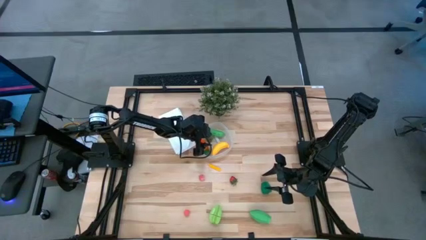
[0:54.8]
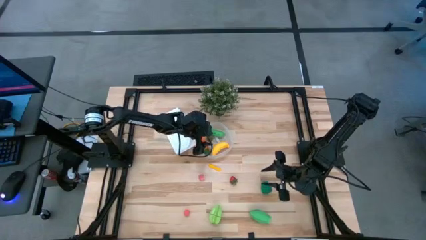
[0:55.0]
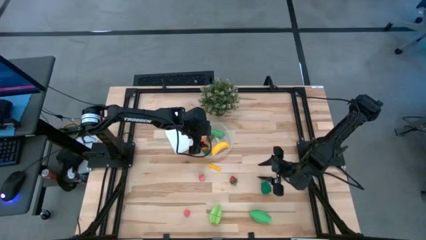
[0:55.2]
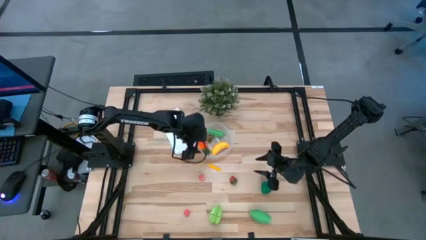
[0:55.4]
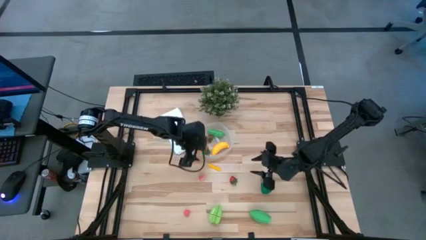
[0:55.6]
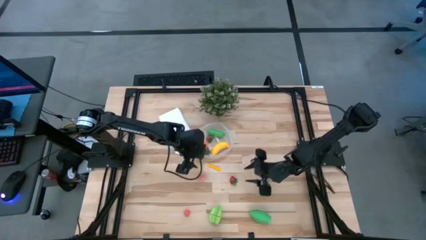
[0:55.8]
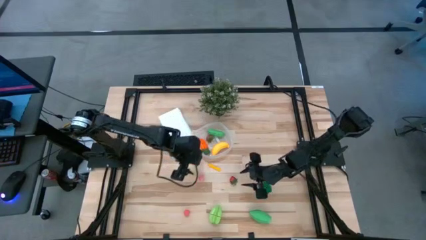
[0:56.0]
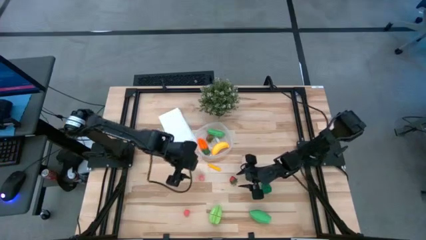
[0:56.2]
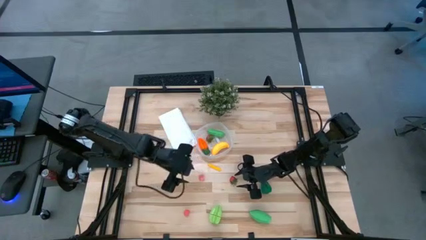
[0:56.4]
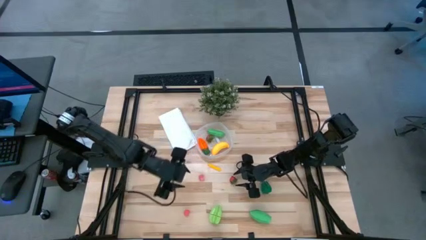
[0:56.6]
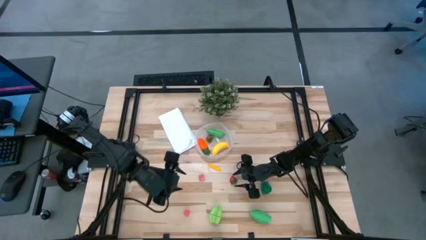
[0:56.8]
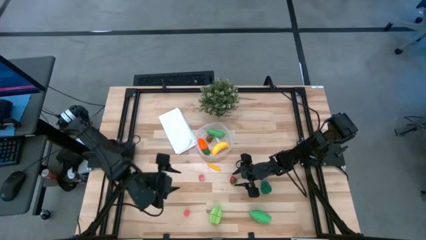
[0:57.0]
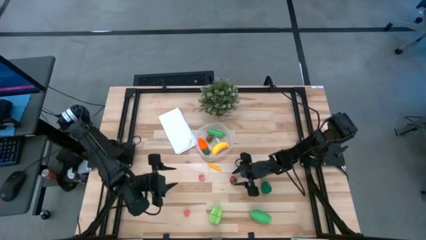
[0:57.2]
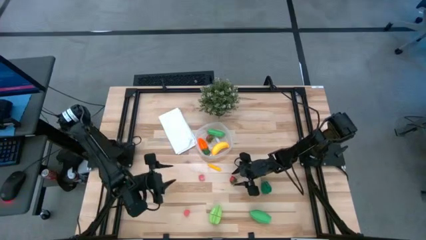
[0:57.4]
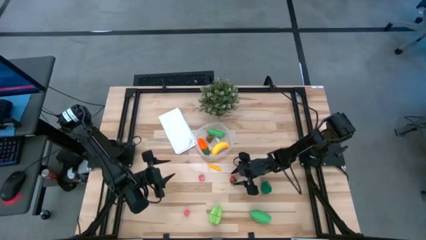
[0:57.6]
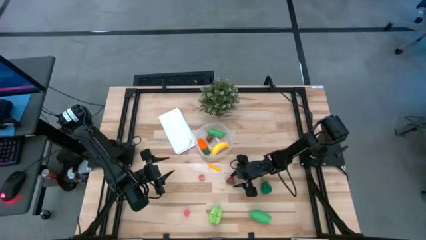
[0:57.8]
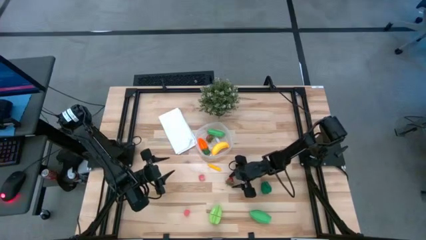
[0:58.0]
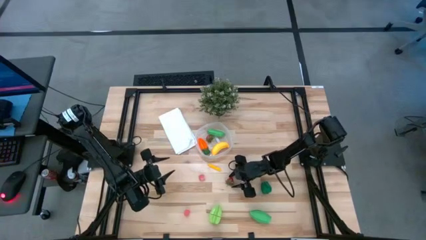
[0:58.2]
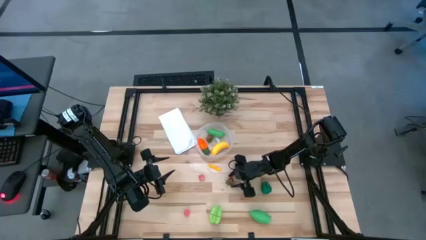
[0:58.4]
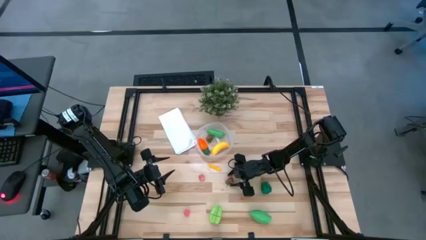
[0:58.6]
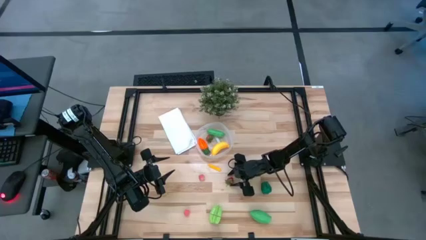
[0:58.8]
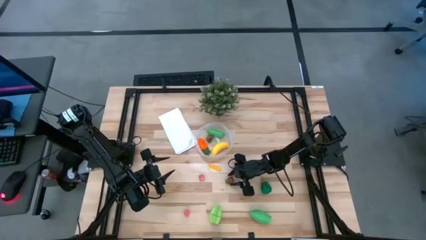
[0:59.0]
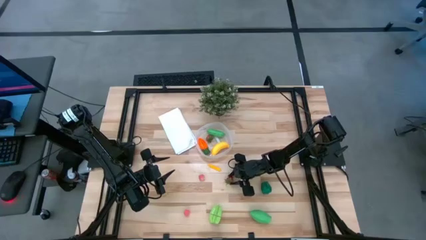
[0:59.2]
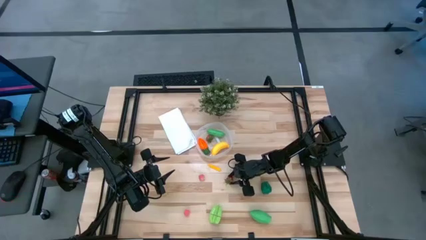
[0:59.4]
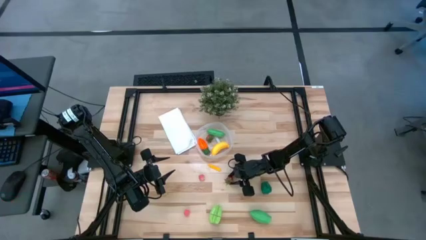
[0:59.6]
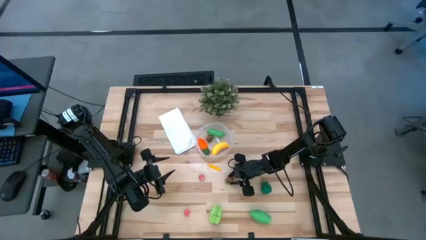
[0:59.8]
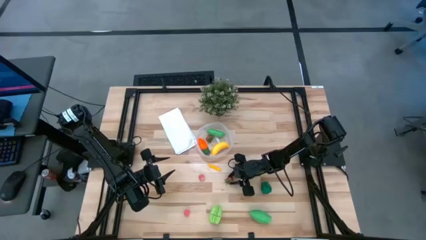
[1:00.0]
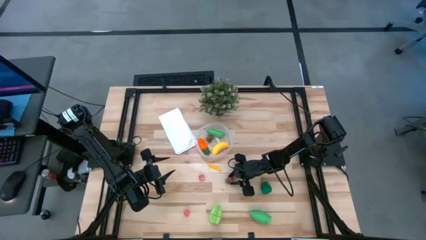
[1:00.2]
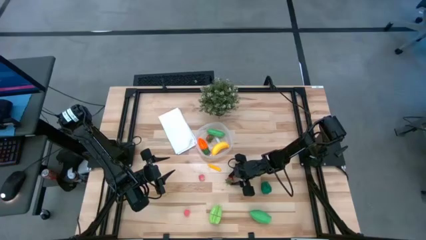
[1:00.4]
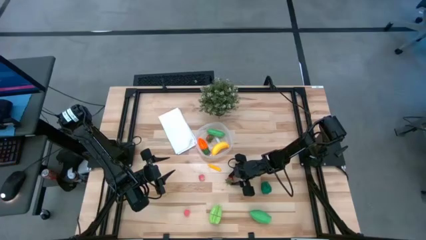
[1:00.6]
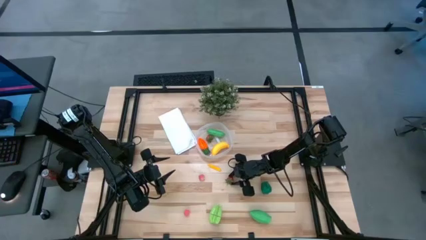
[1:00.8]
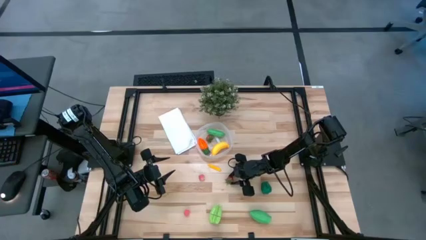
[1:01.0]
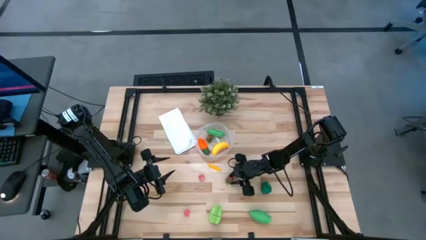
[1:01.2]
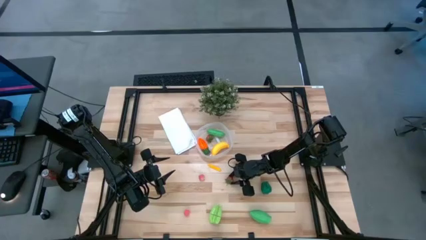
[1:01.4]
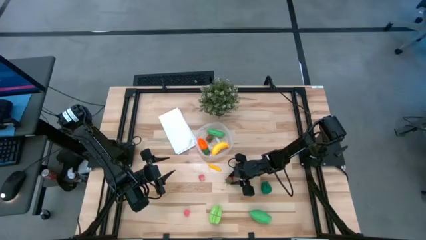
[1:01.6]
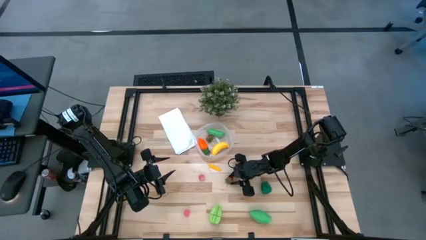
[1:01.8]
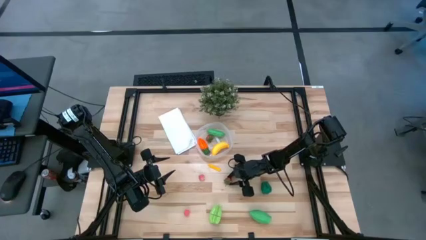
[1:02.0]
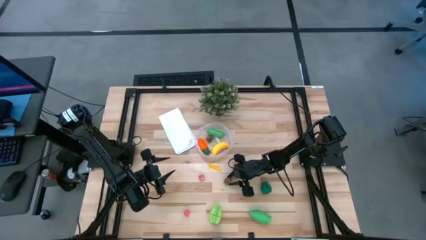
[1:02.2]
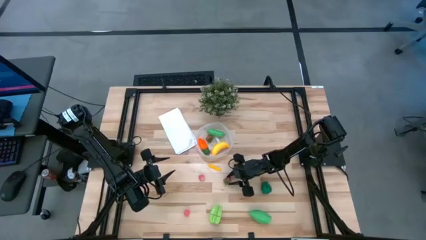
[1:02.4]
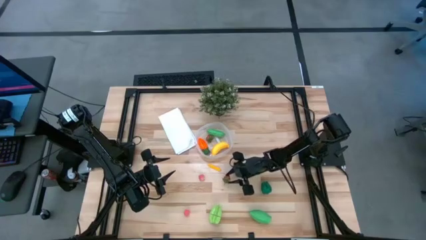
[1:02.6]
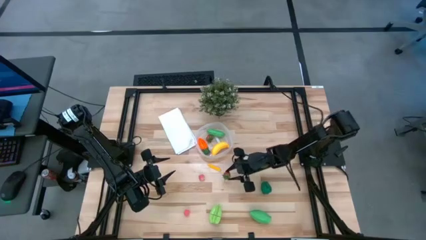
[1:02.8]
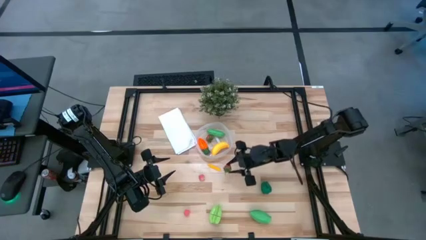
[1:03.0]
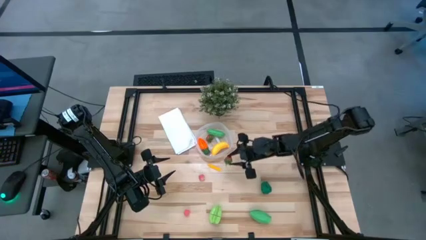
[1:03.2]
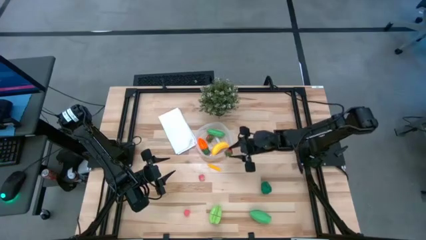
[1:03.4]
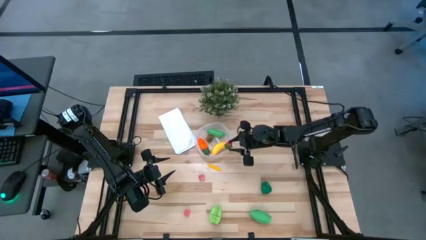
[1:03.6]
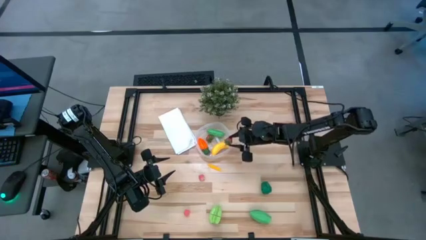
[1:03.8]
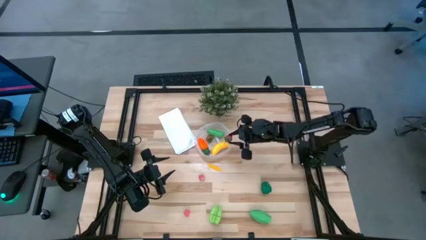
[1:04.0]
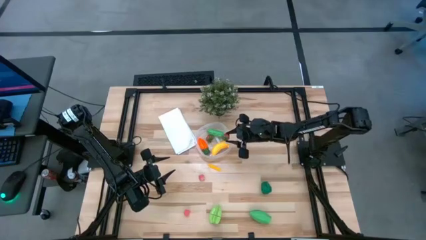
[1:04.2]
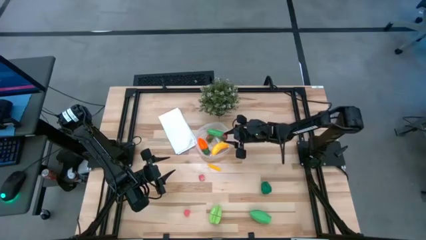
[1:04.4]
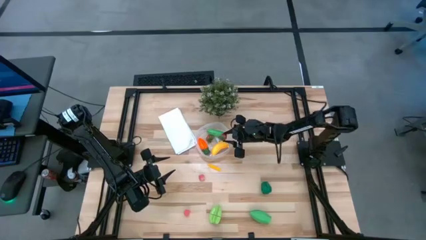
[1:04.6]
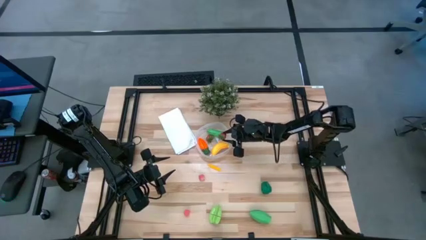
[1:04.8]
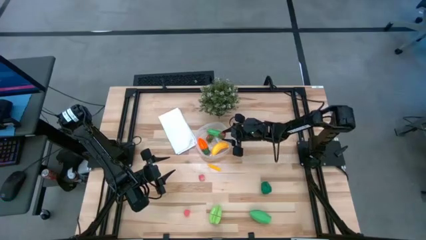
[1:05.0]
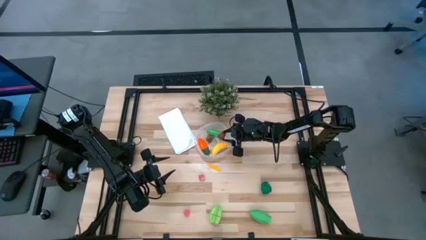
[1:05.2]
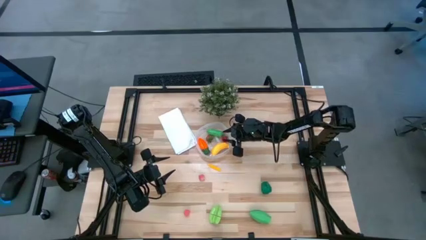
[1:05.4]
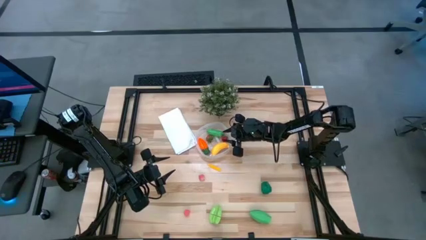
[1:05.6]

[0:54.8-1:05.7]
Task: Pick and placing Produce into tupperware
Put the red strawberry into the transparent bin

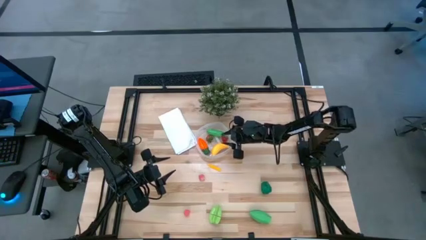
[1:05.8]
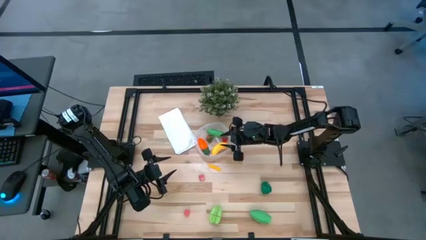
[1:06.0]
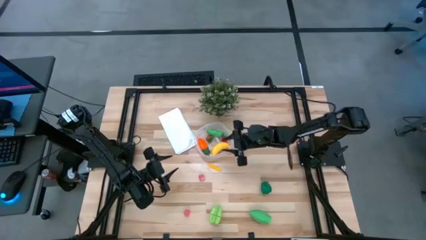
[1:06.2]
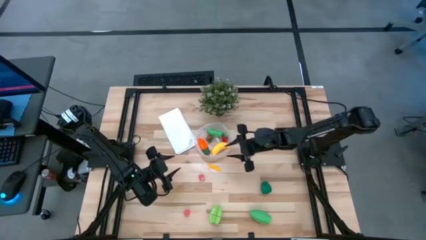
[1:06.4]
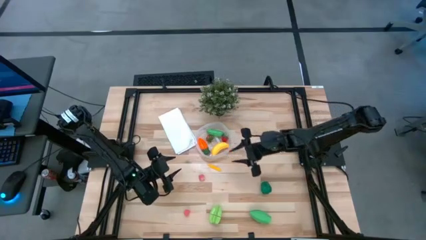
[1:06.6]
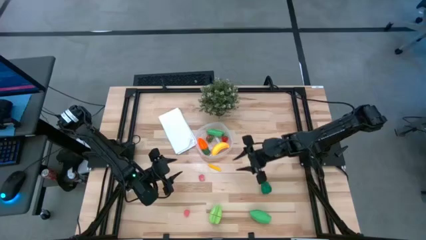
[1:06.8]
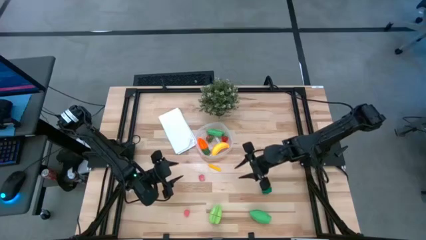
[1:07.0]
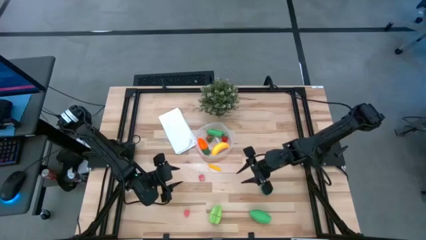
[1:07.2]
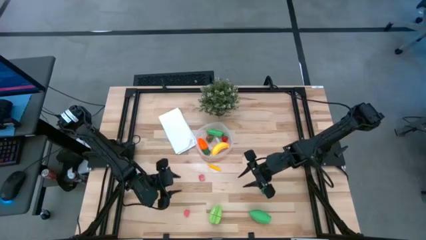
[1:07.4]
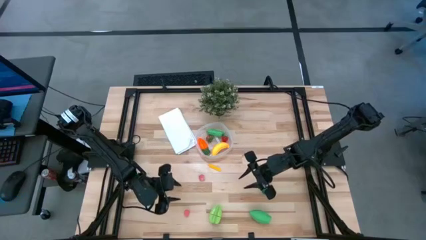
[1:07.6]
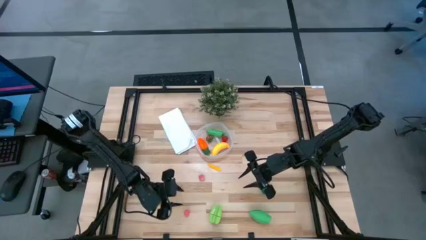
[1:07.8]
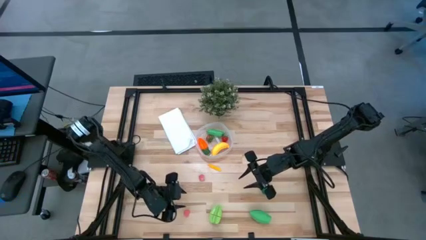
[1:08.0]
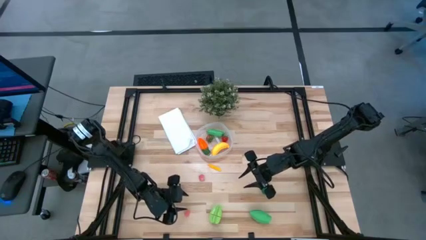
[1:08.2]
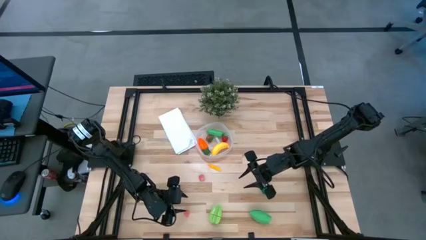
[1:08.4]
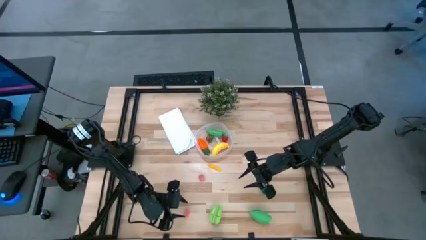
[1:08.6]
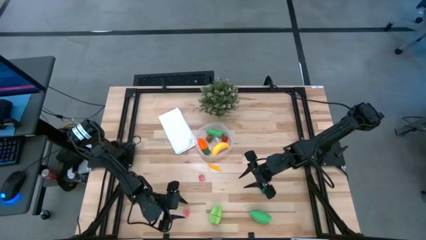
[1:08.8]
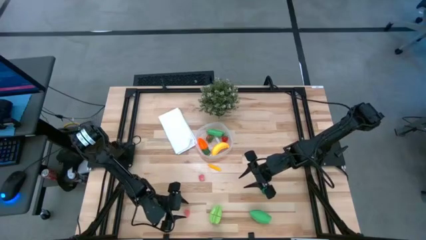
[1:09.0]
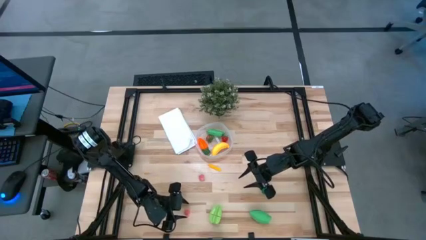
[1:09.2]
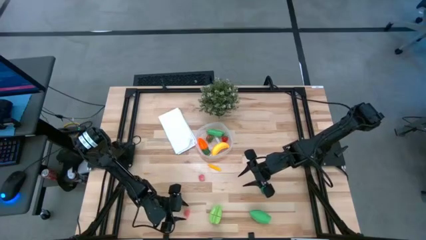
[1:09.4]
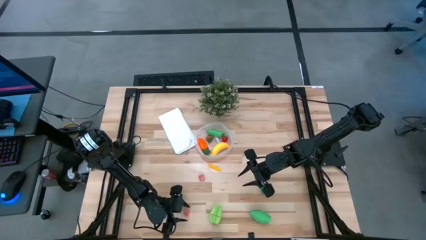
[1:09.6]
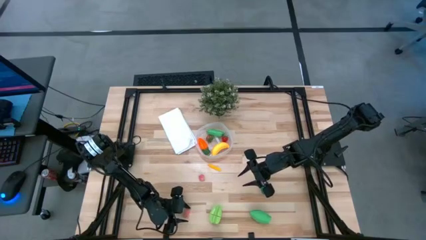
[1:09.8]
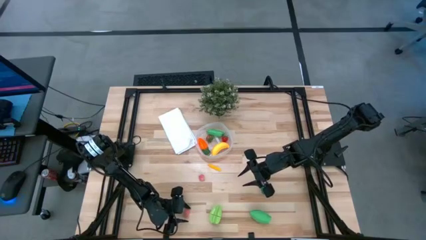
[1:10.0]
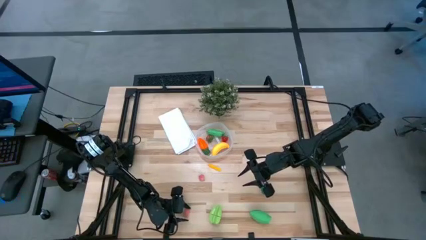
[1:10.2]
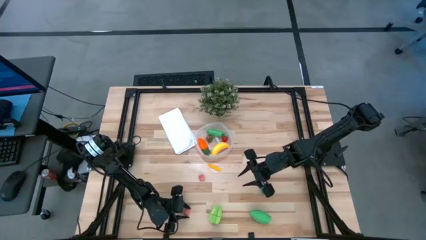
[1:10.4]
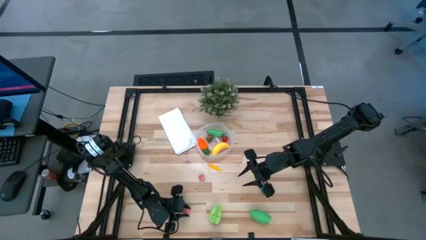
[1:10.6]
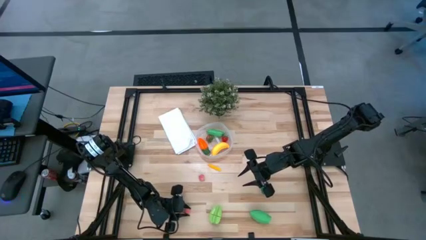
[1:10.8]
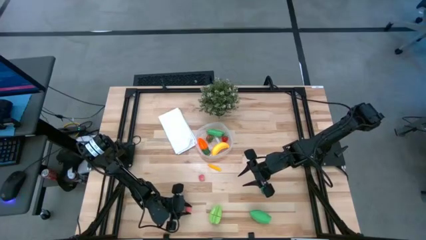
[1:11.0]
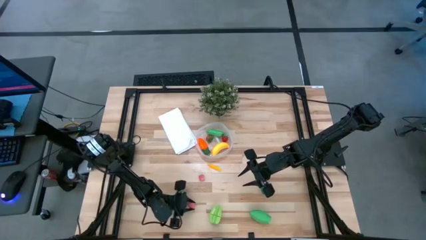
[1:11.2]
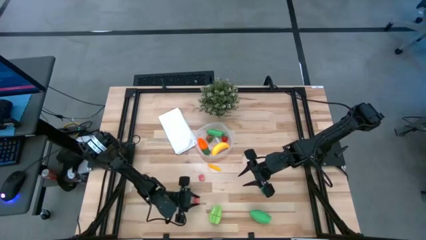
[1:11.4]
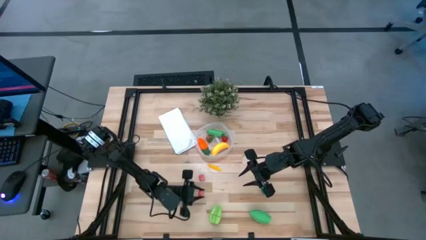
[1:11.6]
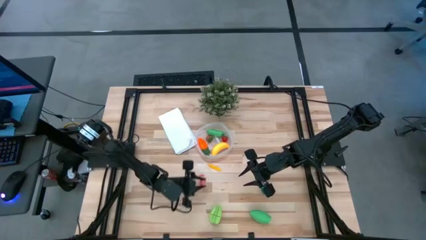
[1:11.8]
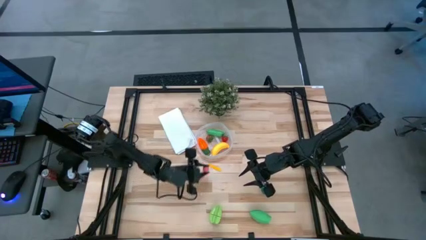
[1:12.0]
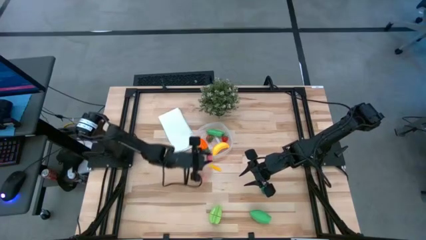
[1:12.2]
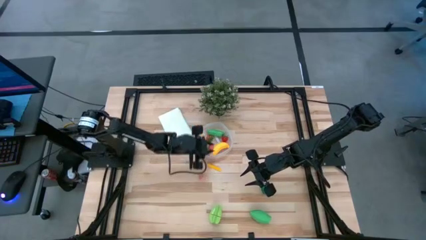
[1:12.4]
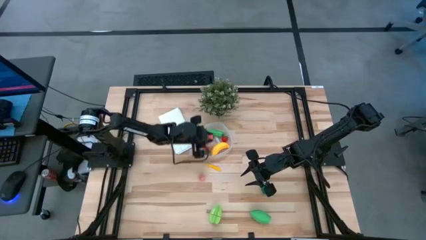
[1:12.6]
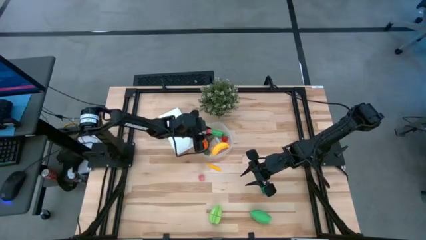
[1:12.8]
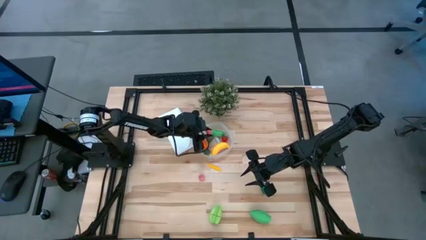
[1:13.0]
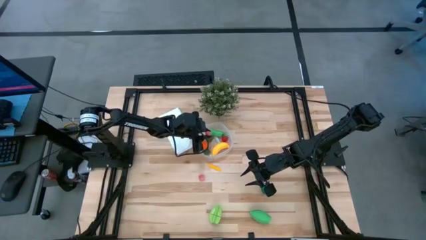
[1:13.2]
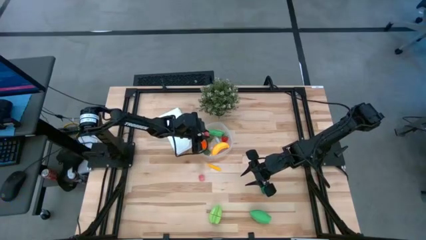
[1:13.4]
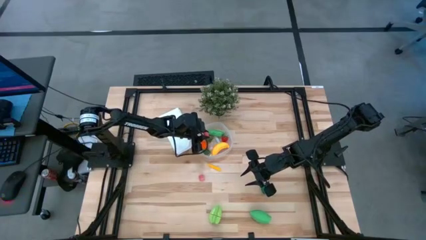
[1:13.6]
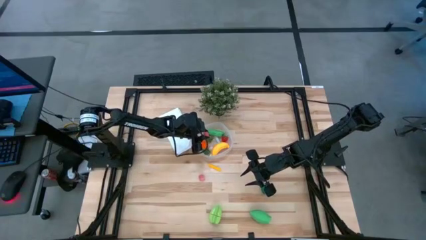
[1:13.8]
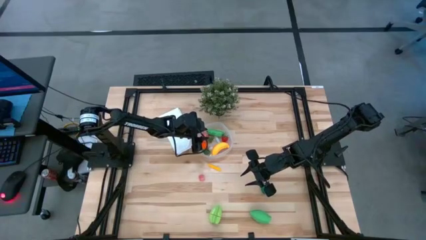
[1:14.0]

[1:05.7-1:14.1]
Put the bottom pink peach into the transparent bin
